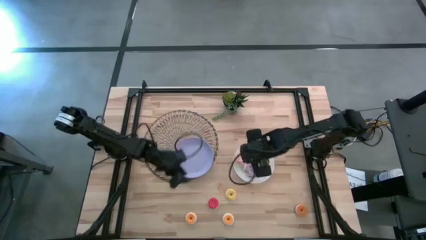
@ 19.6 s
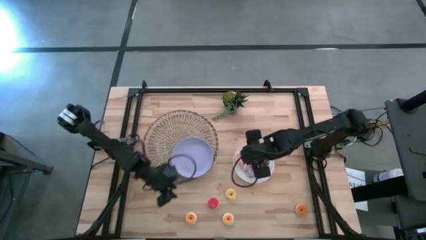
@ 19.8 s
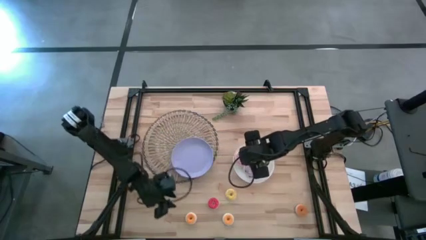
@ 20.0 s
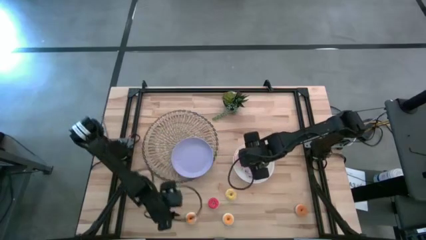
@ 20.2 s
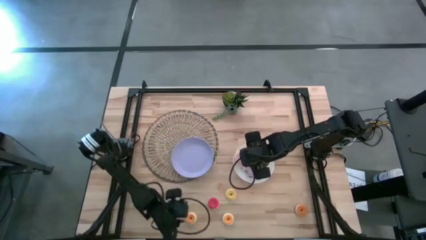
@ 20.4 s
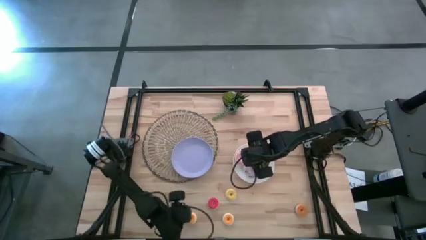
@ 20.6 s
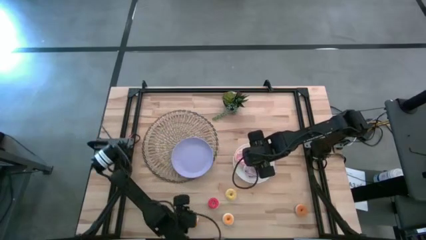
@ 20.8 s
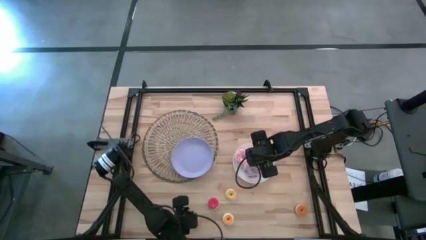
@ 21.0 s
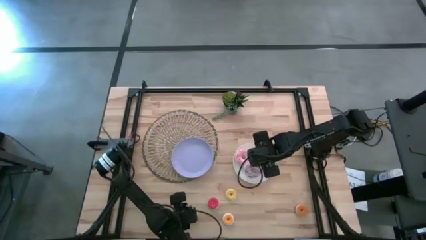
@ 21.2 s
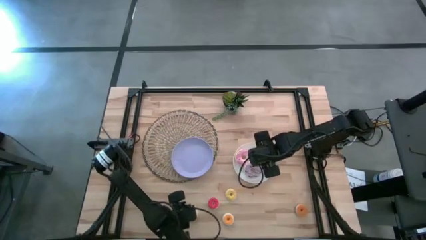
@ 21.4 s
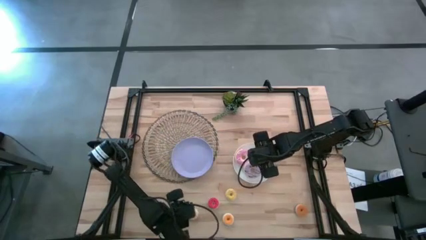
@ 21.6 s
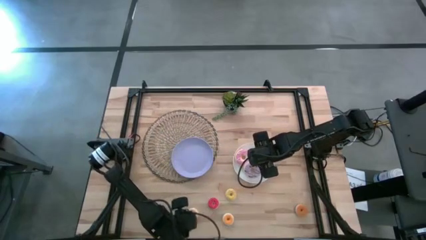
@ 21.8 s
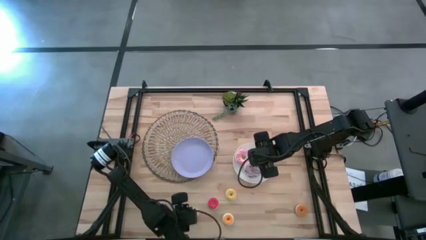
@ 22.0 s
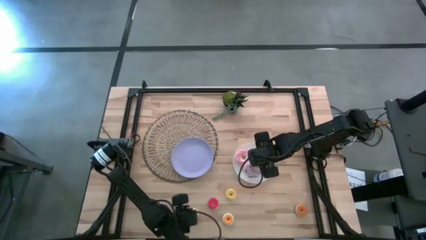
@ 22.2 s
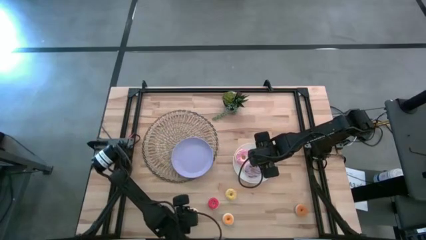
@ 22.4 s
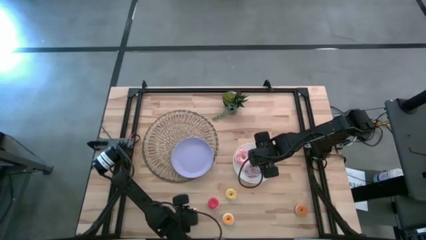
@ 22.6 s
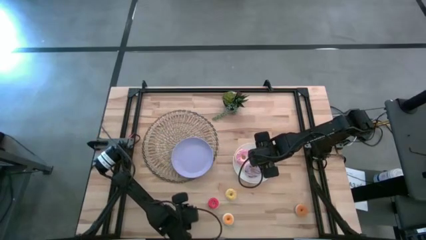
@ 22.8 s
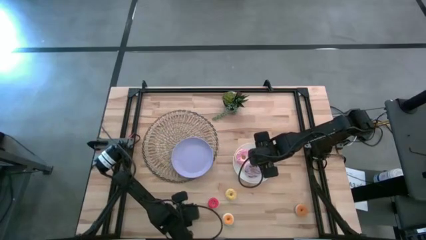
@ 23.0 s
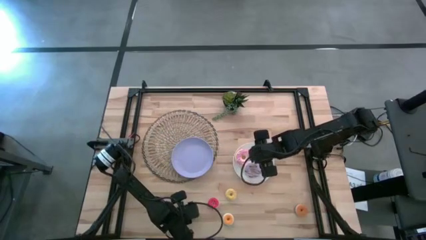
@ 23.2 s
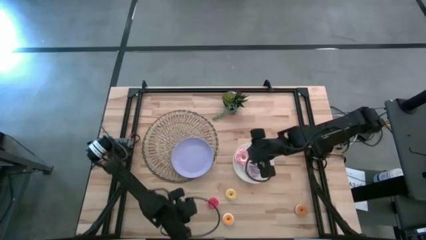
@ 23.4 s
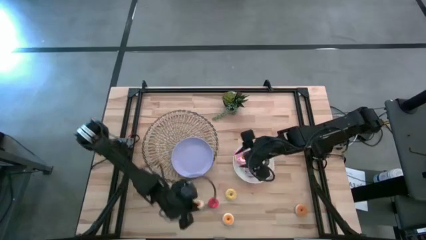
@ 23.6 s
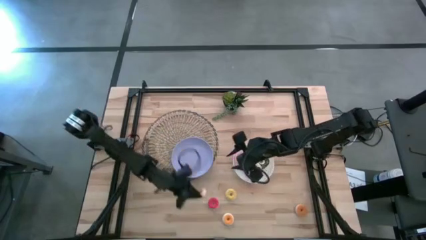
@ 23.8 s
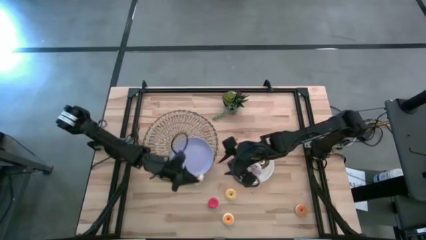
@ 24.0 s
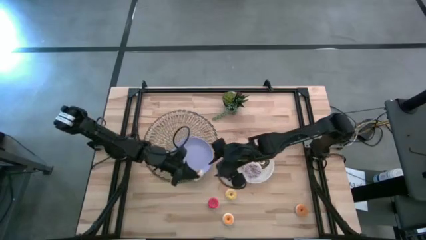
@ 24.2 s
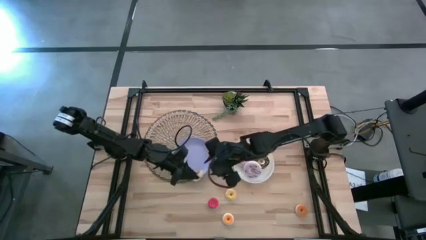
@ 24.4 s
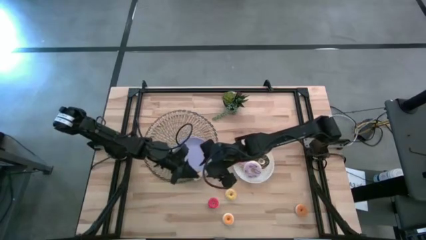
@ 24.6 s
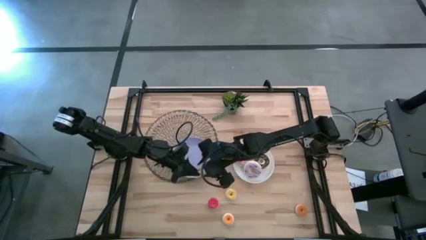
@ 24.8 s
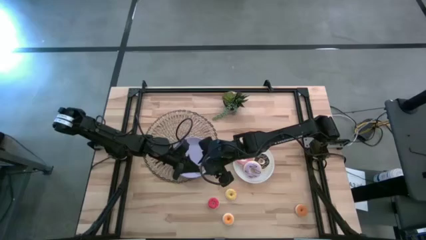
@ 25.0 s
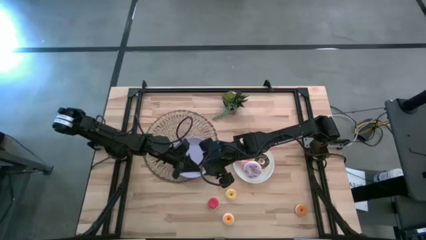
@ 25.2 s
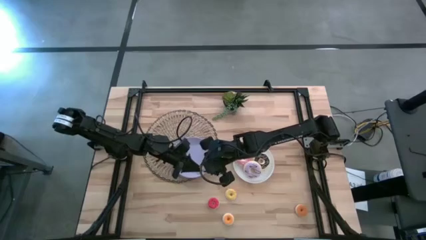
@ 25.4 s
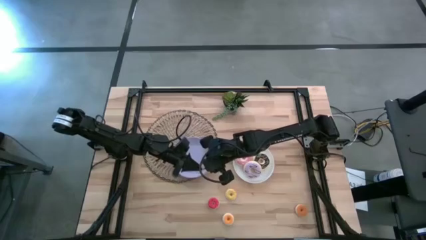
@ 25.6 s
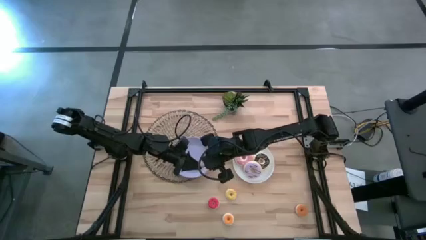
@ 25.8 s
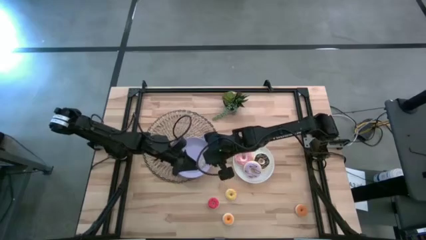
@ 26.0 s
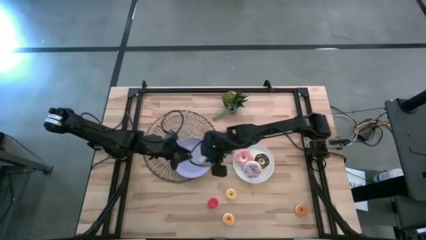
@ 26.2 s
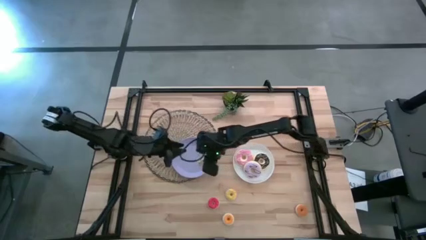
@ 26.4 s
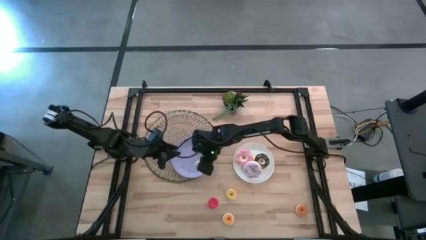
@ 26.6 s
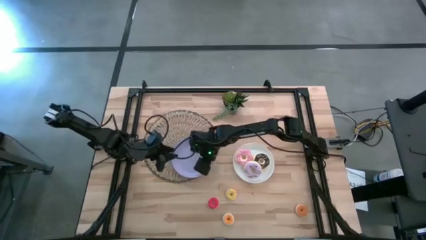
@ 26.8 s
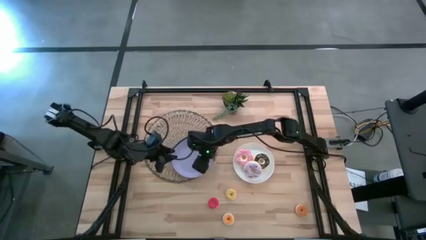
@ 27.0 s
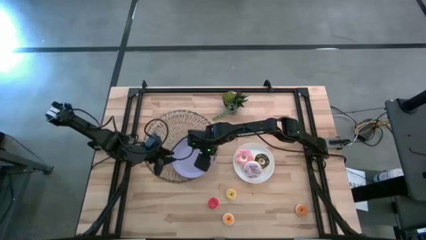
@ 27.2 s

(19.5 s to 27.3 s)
Task: Pick & Place donuts
Put the small white donut on the purple plate

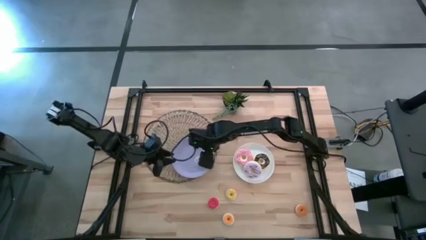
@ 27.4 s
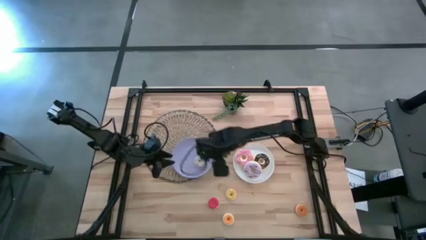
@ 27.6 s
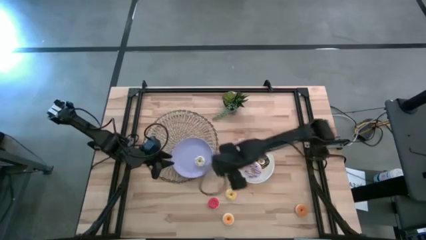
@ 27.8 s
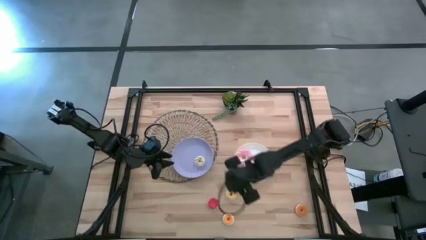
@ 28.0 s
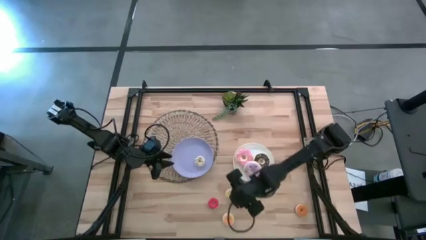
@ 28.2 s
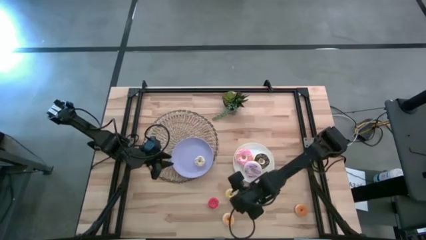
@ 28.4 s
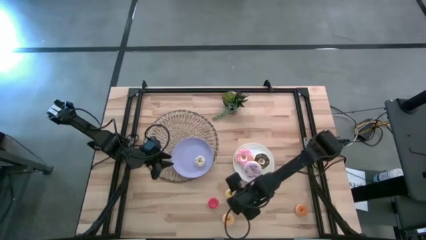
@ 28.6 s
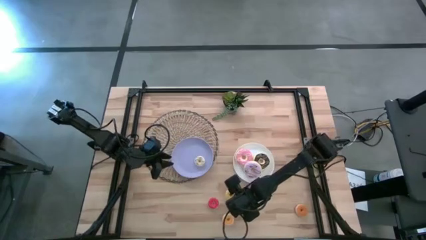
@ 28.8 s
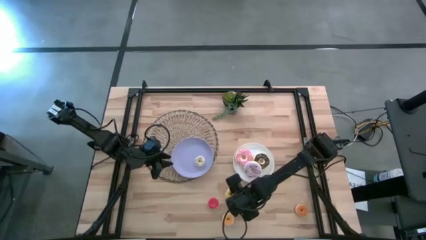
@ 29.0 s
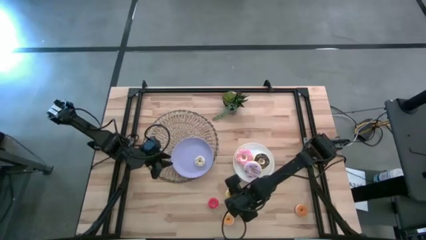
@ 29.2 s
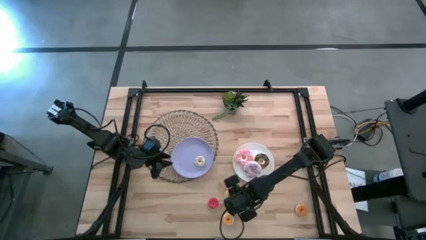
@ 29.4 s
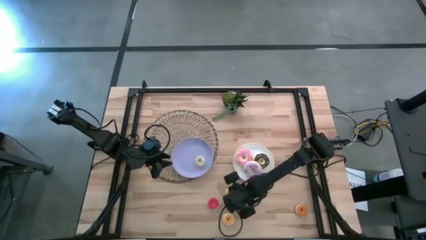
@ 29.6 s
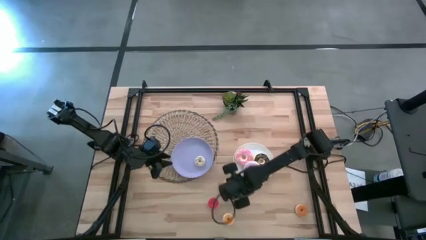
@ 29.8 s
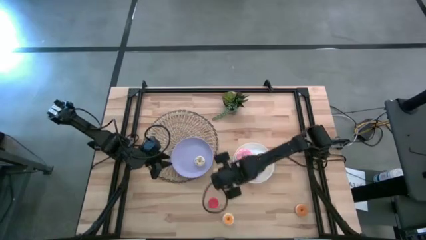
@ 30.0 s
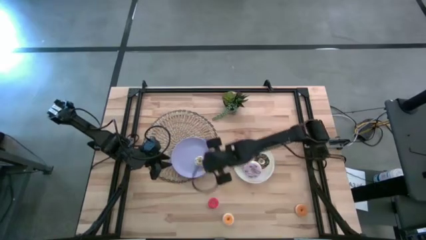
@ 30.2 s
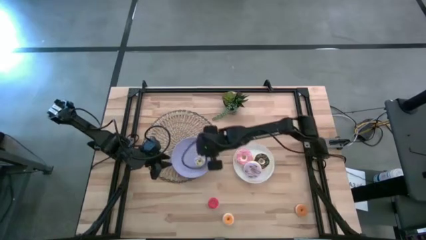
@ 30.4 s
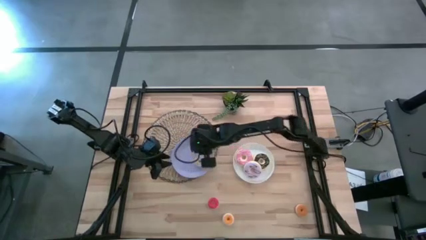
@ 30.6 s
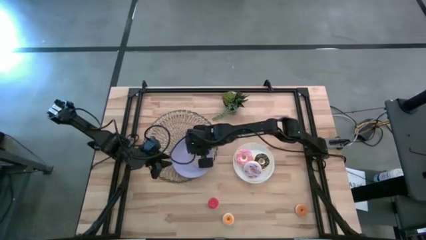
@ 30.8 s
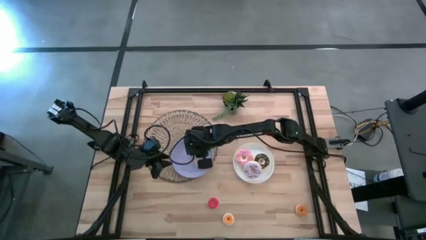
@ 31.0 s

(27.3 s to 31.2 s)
Put the small yellow donut on the purple plate

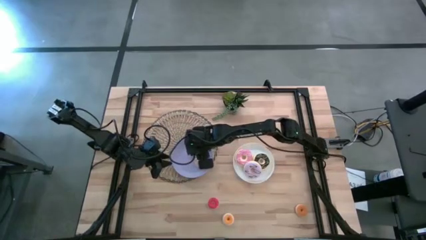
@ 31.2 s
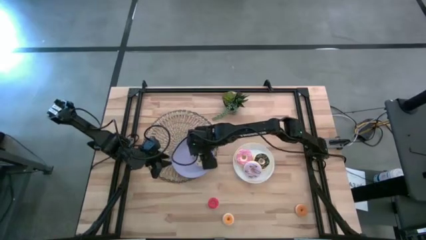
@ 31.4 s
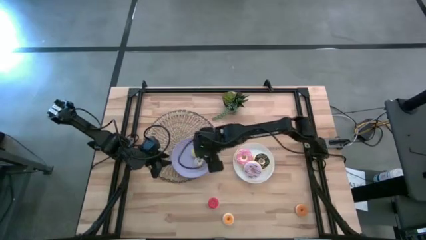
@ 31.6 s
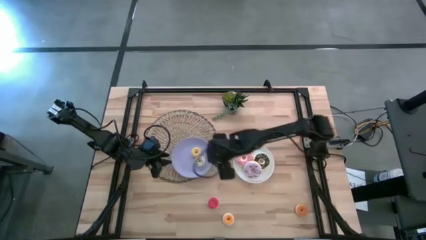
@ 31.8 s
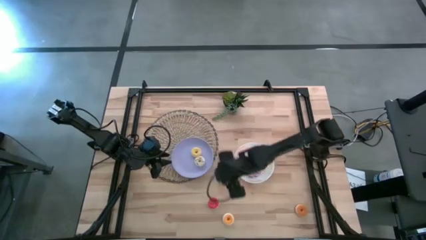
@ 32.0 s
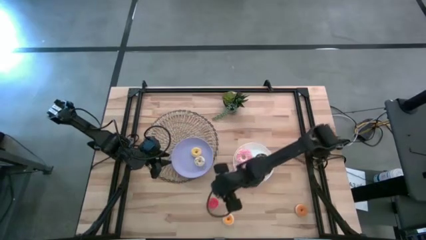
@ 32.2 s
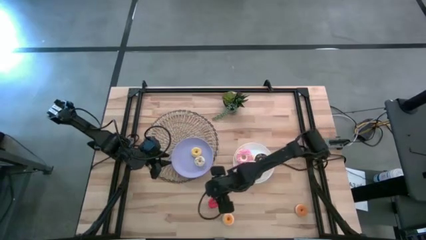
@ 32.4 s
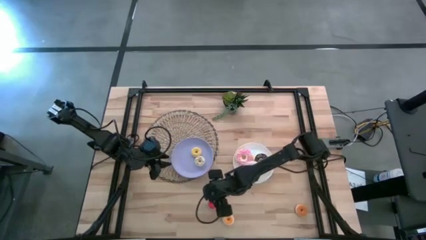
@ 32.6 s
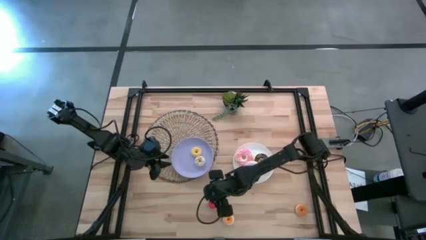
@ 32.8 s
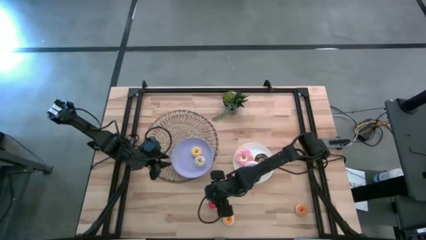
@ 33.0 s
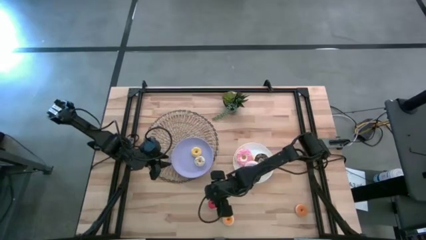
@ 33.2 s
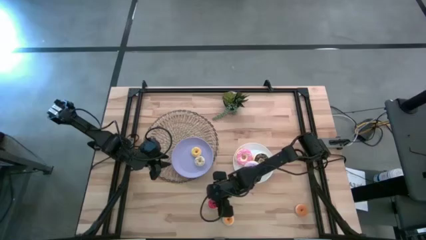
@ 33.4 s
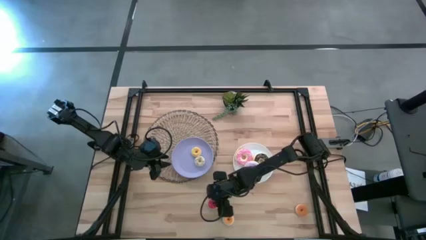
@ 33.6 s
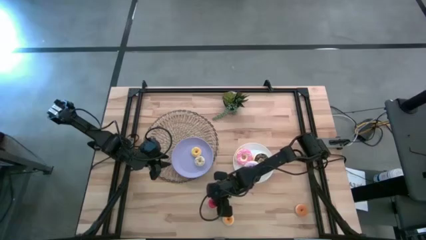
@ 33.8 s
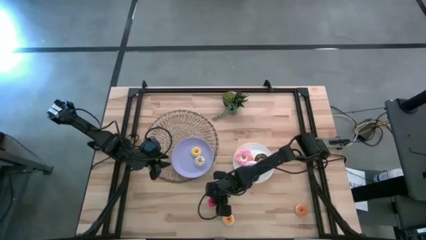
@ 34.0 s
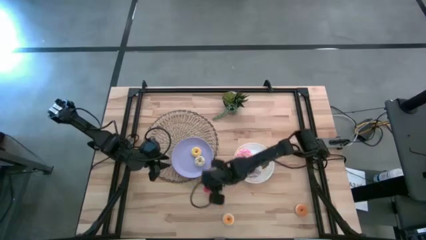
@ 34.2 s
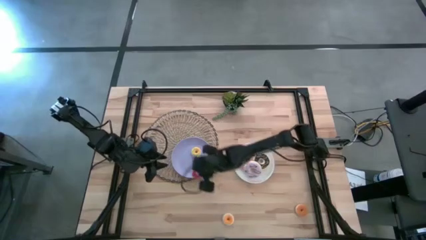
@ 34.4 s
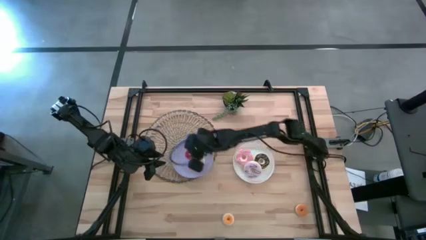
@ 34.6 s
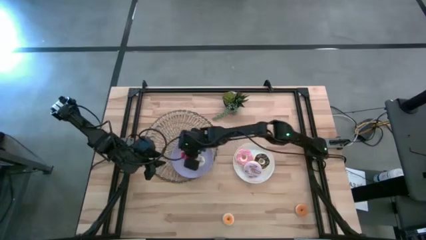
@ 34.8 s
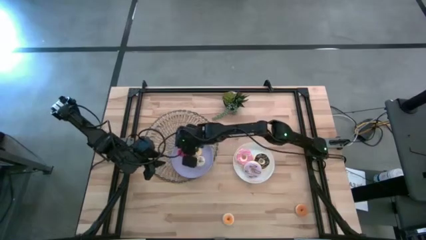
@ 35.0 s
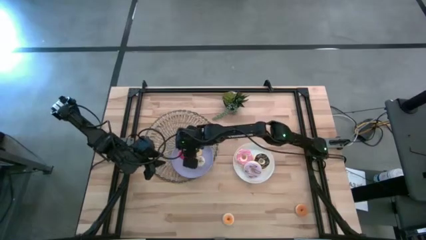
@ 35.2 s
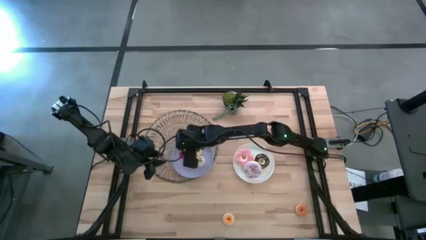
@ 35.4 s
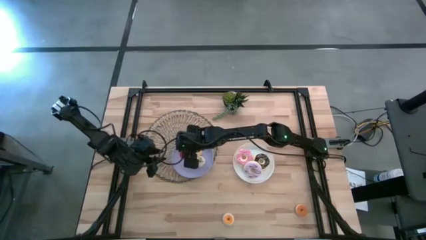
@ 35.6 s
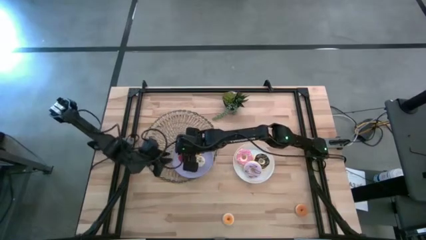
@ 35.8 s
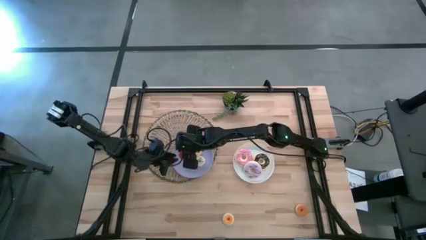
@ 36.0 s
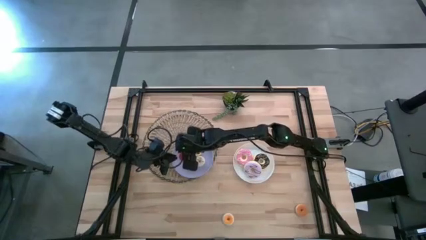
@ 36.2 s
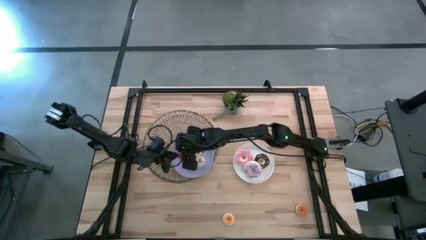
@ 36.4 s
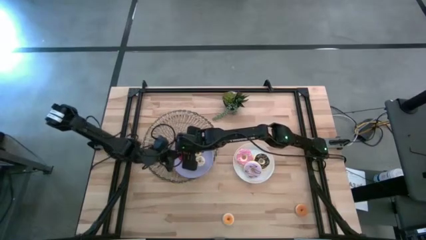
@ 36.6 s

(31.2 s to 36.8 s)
Put the small red donut on the purple plate
